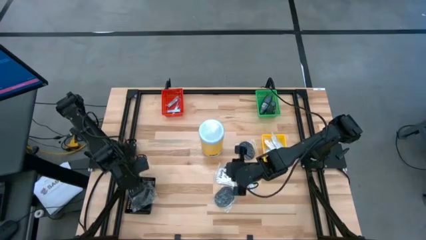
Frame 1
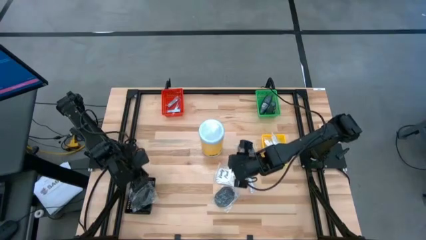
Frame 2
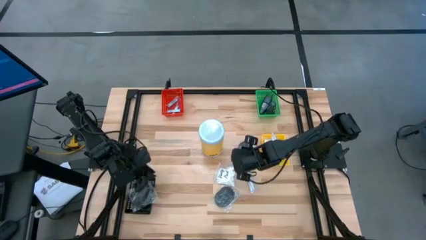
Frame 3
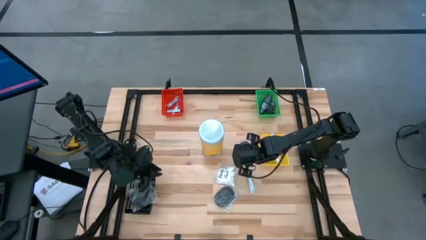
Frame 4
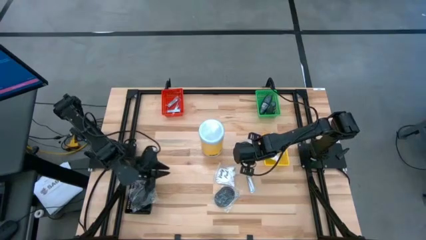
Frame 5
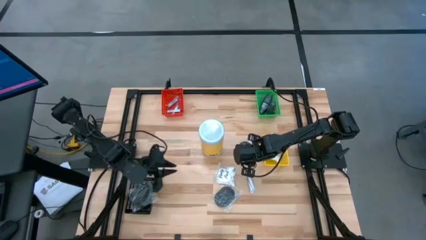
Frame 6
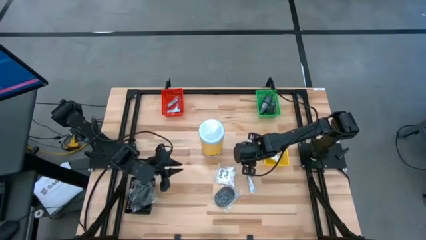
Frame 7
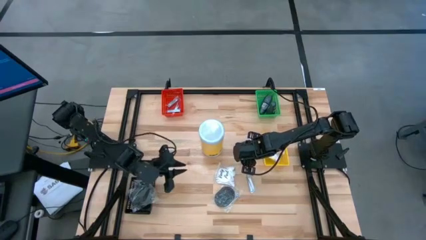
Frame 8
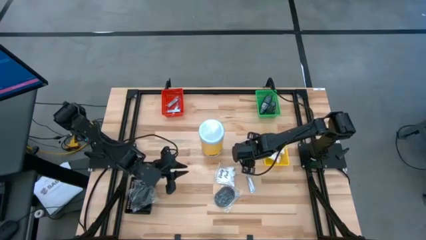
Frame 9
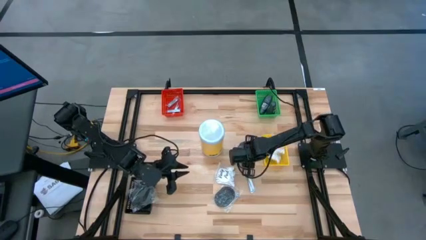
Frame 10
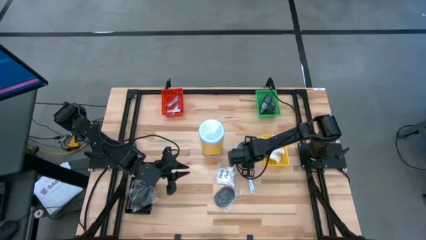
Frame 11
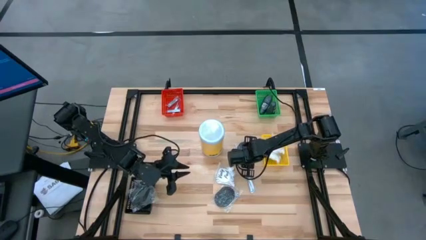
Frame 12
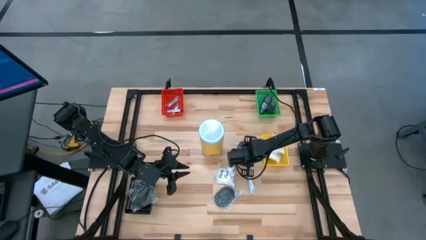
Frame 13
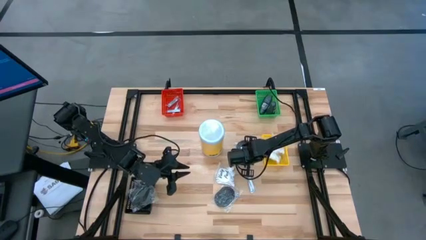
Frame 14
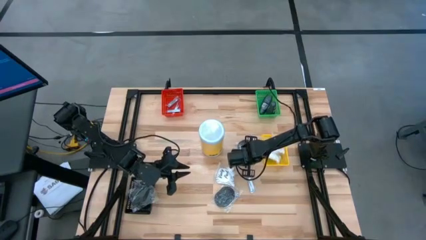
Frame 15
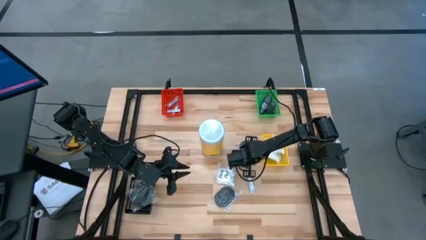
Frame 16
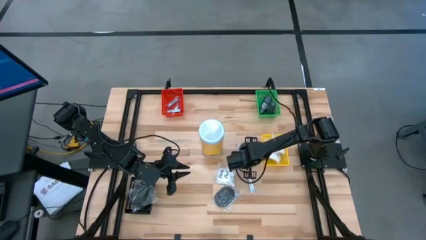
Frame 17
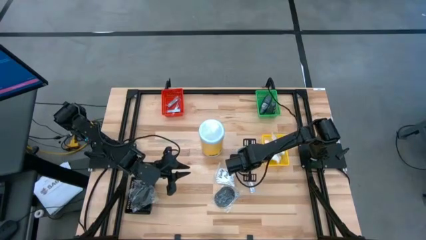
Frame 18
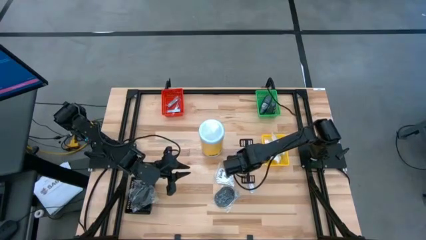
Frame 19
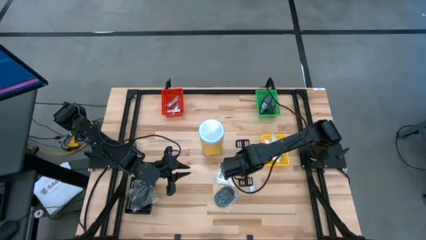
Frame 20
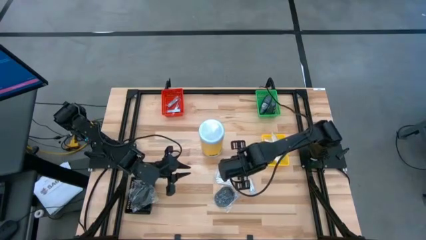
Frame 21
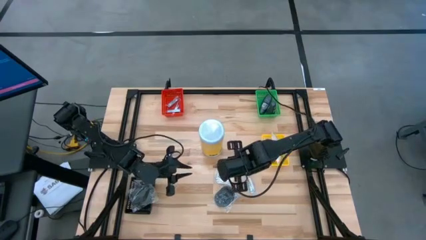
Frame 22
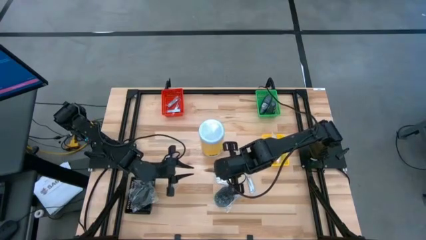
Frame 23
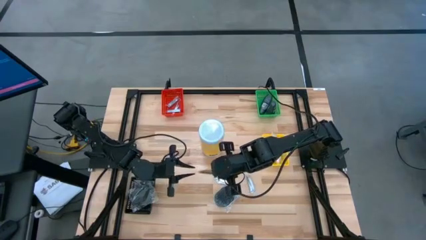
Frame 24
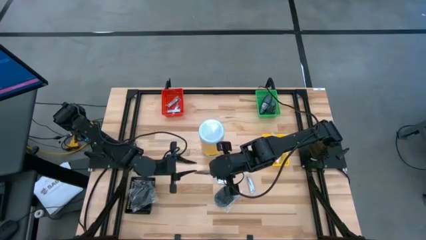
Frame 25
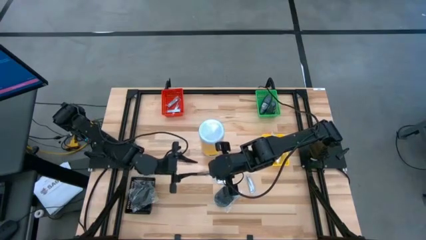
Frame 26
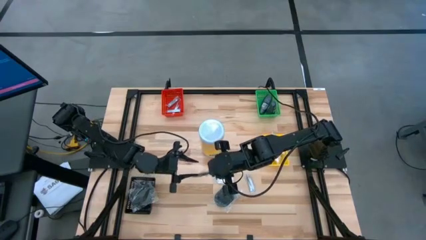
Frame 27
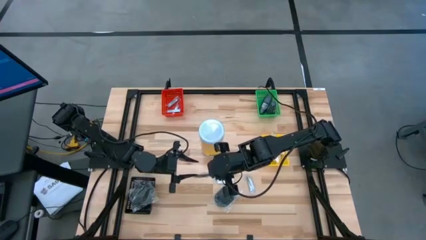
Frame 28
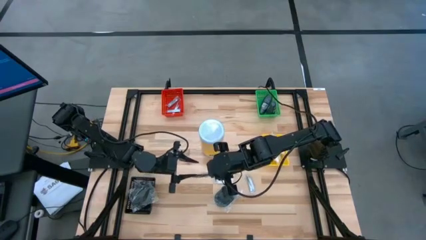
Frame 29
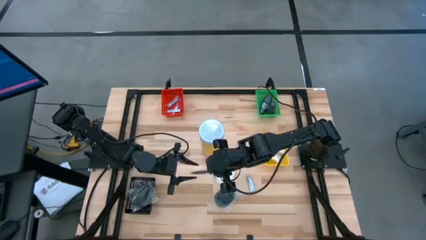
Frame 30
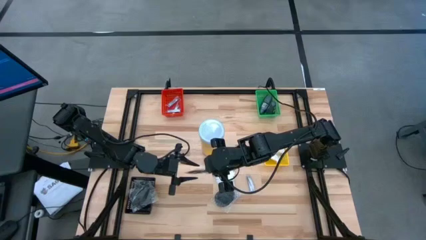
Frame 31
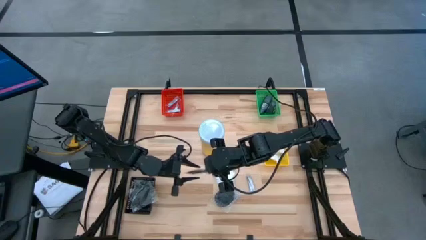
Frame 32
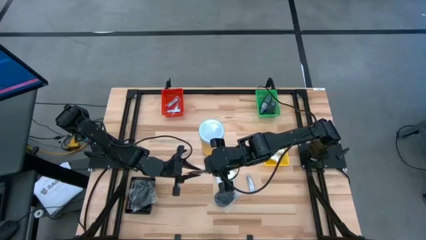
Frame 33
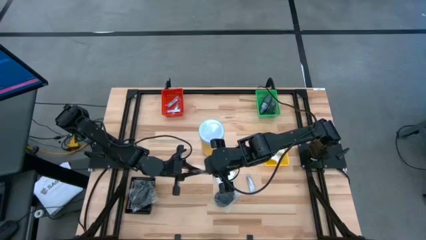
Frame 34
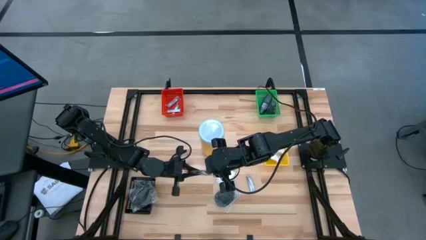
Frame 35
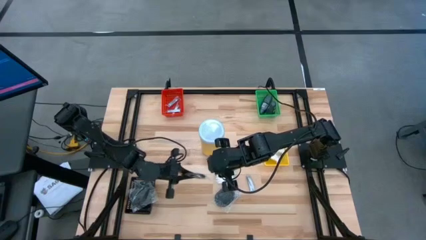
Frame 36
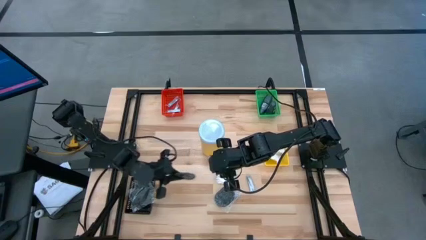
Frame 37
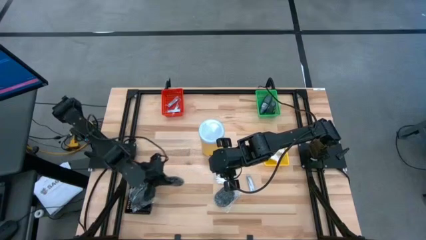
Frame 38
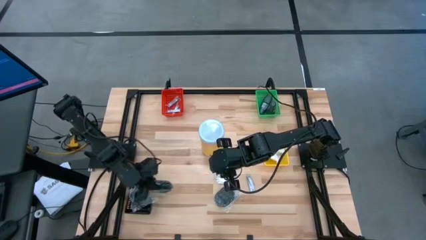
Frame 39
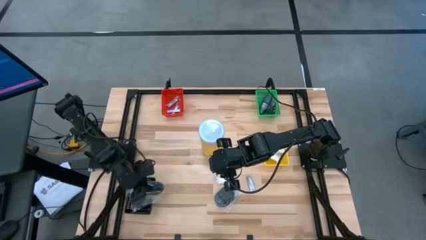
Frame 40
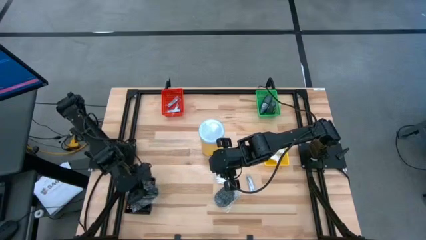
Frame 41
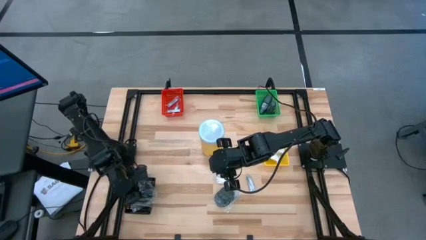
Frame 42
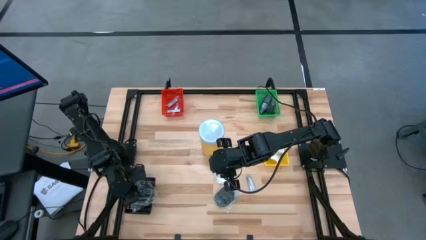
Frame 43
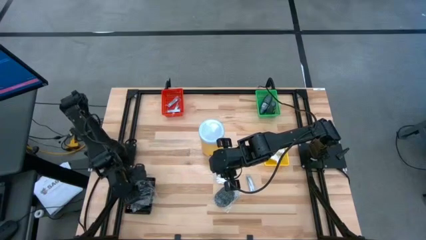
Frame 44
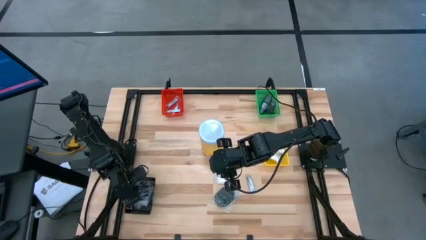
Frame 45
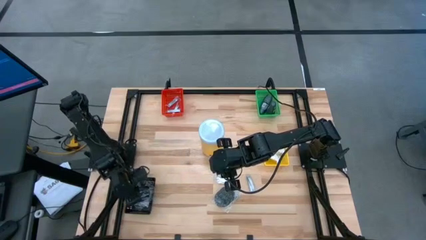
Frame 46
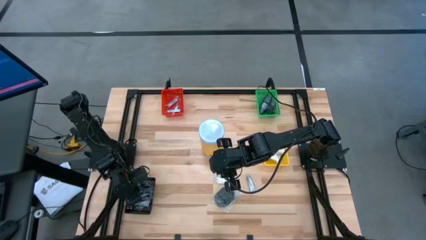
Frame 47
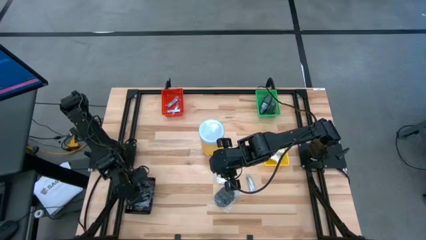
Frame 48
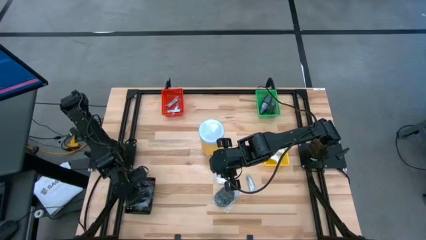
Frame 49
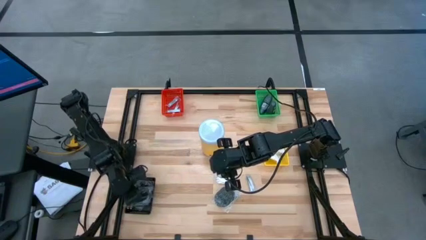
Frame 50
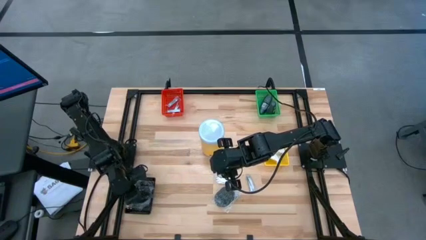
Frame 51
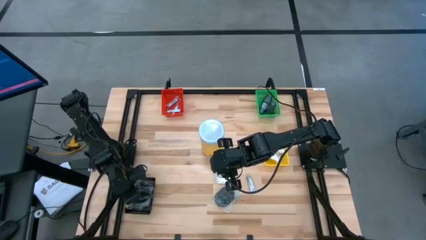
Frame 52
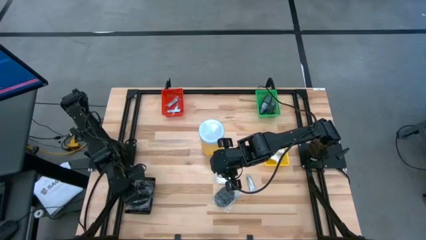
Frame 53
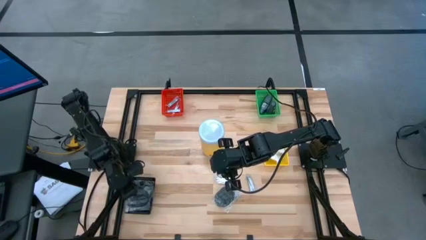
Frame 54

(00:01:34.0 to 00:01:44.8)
Task: Pick & Place Travel size toiletries
Put the black hairbrush into the black bin
